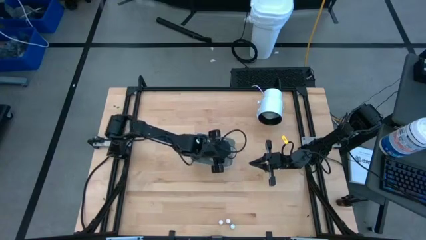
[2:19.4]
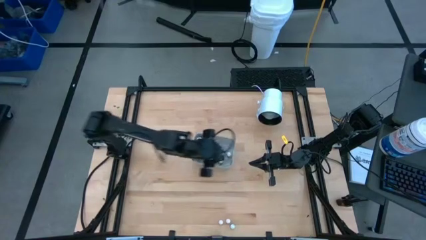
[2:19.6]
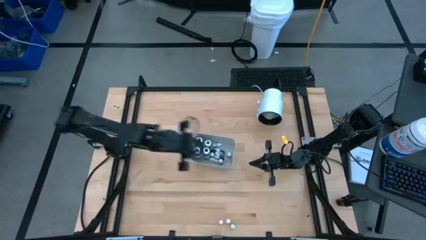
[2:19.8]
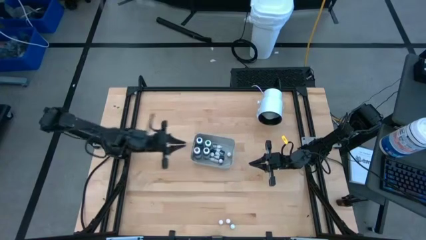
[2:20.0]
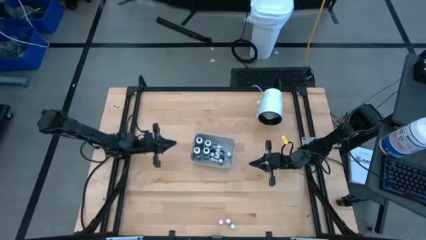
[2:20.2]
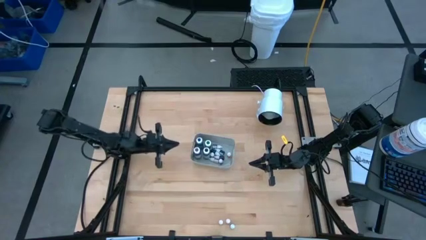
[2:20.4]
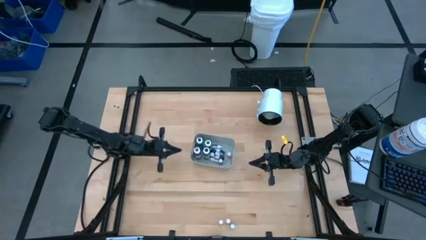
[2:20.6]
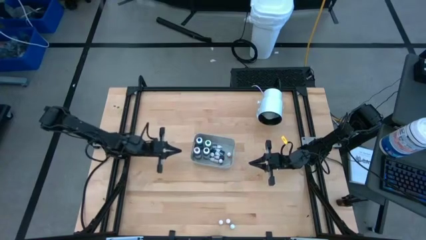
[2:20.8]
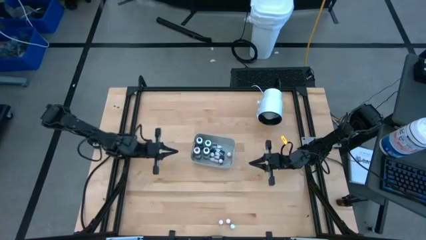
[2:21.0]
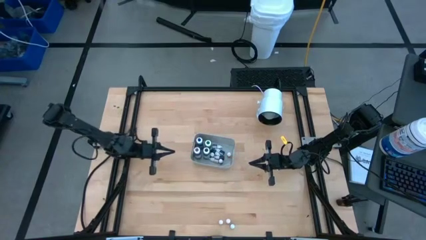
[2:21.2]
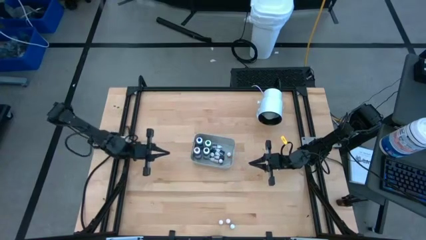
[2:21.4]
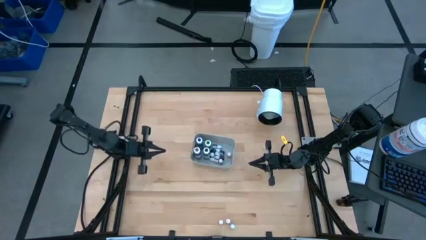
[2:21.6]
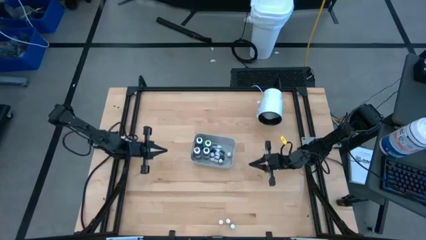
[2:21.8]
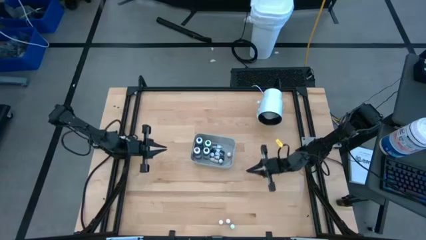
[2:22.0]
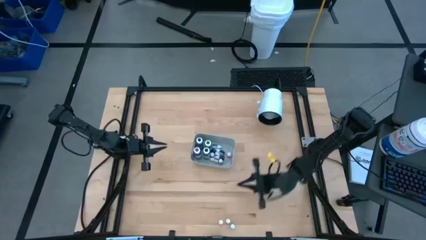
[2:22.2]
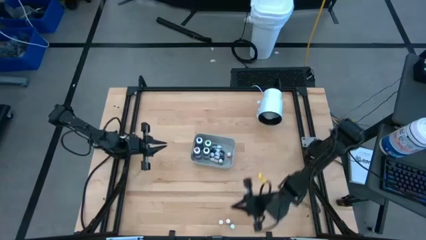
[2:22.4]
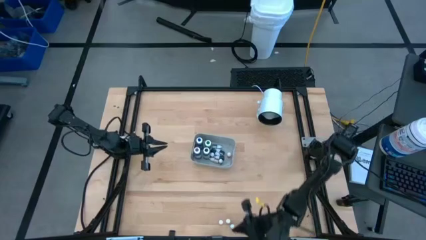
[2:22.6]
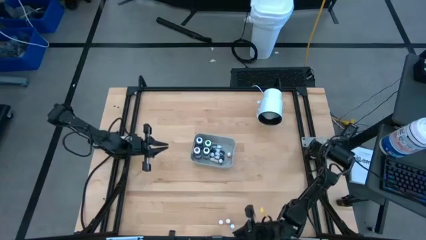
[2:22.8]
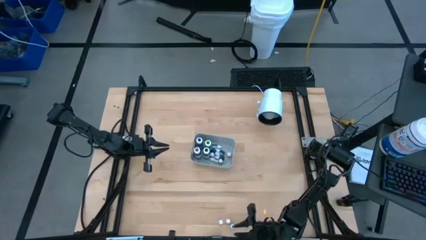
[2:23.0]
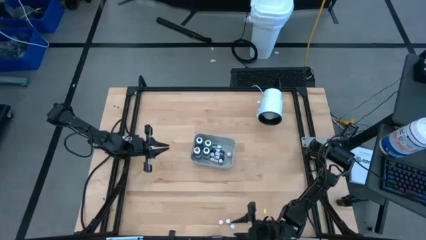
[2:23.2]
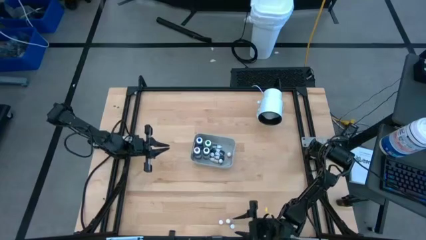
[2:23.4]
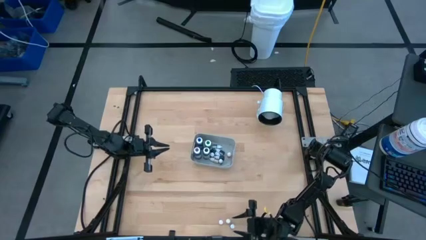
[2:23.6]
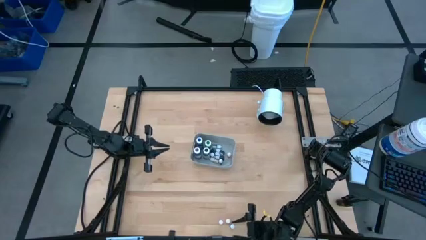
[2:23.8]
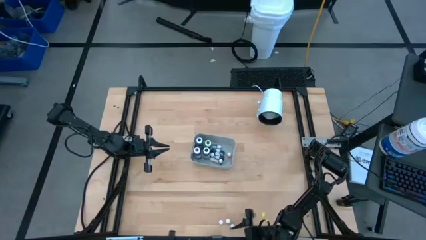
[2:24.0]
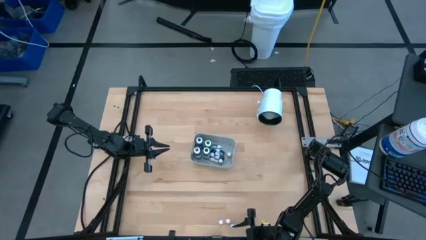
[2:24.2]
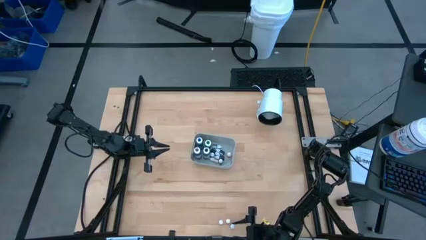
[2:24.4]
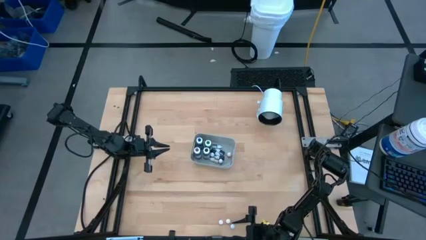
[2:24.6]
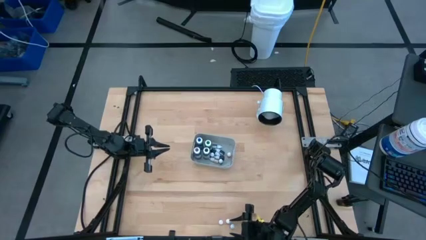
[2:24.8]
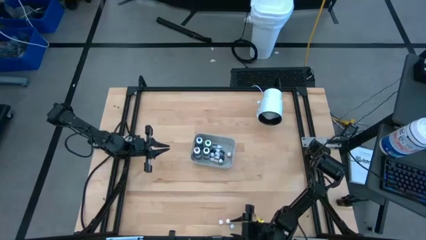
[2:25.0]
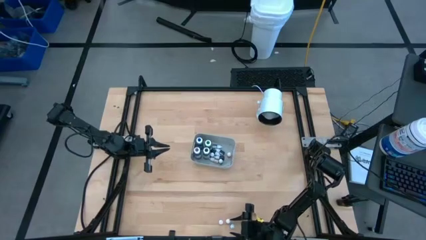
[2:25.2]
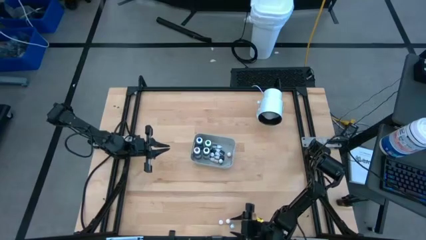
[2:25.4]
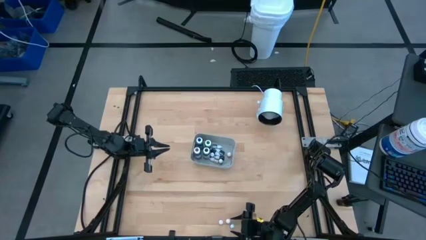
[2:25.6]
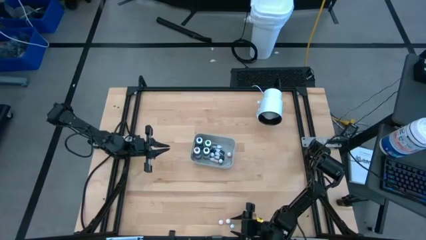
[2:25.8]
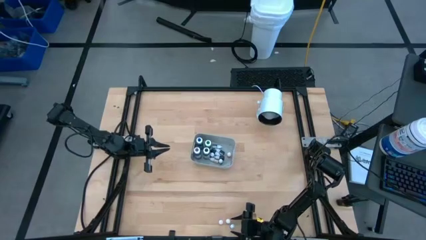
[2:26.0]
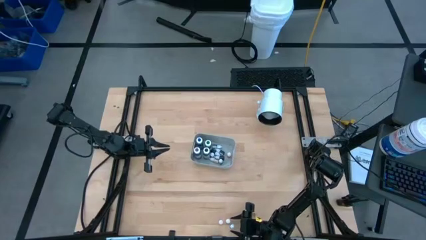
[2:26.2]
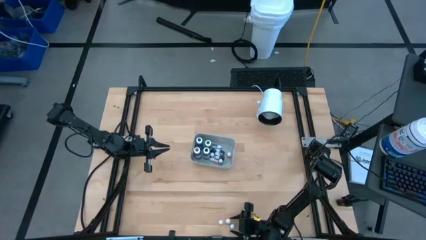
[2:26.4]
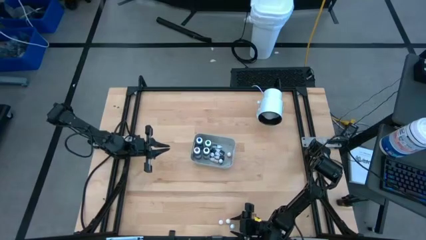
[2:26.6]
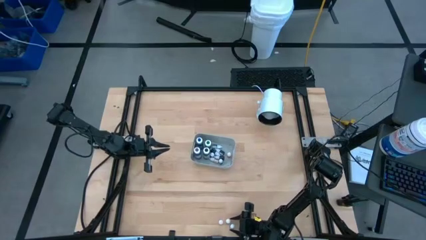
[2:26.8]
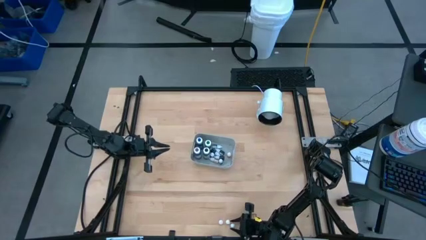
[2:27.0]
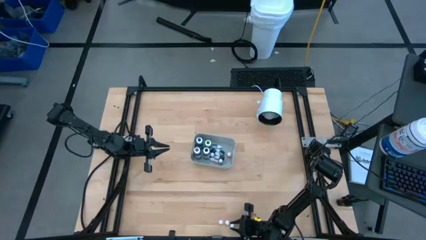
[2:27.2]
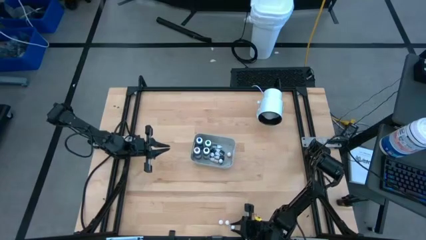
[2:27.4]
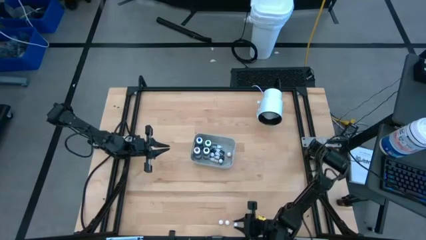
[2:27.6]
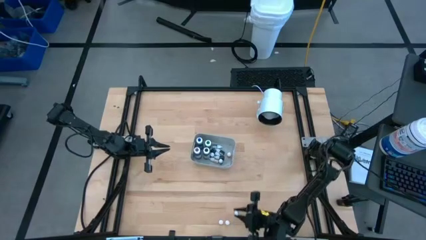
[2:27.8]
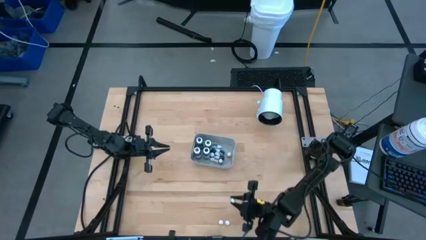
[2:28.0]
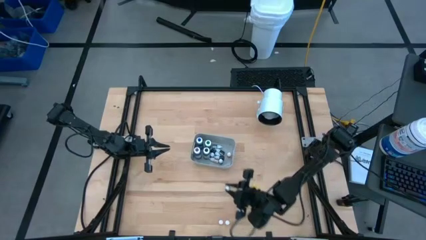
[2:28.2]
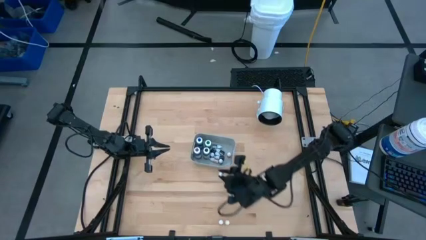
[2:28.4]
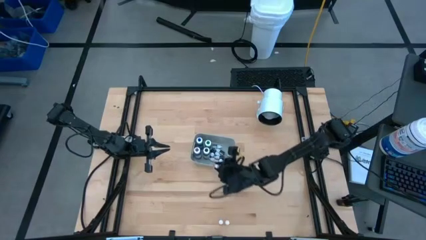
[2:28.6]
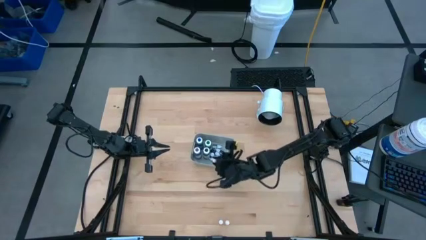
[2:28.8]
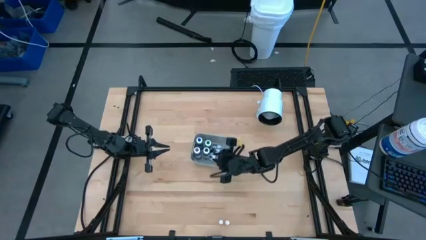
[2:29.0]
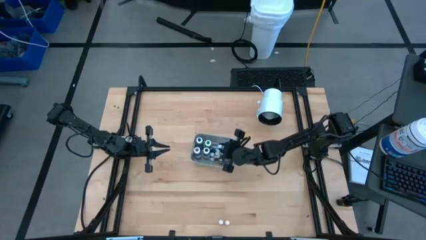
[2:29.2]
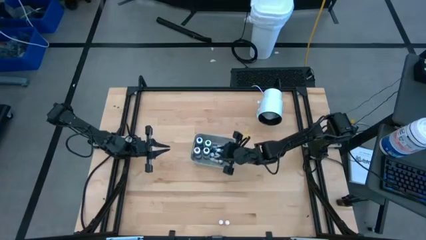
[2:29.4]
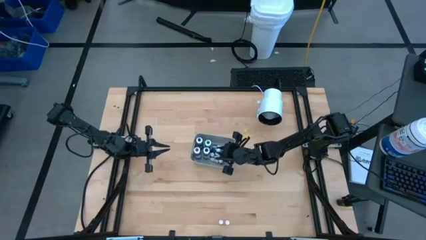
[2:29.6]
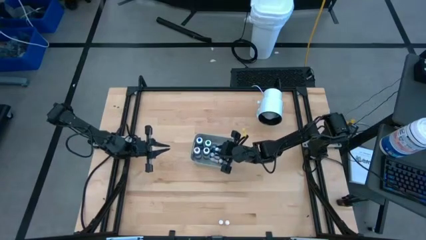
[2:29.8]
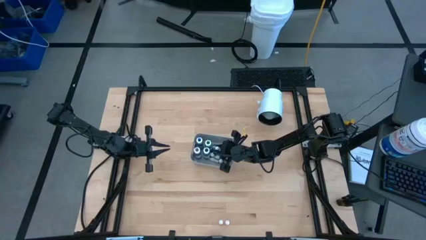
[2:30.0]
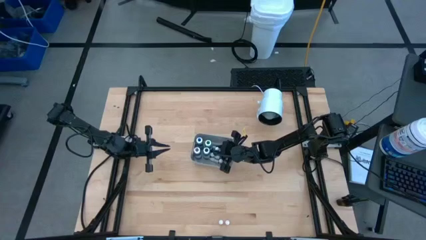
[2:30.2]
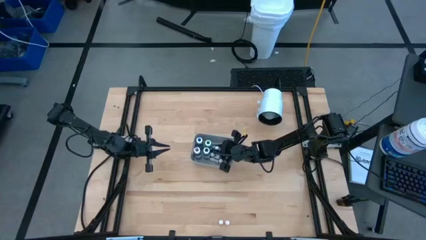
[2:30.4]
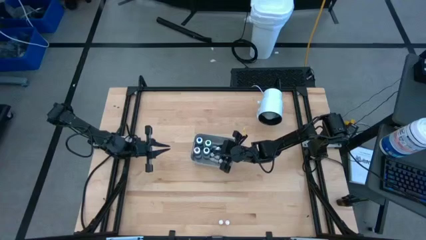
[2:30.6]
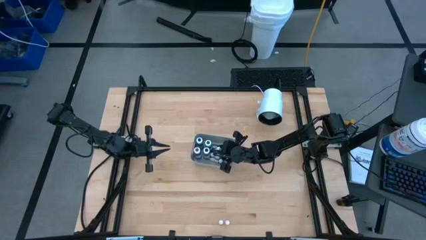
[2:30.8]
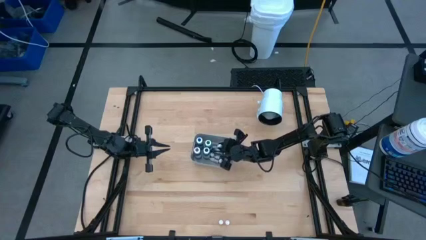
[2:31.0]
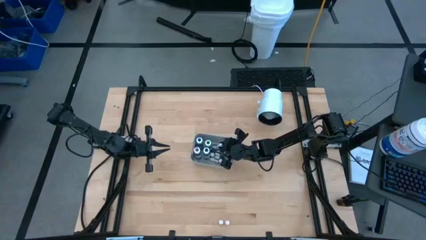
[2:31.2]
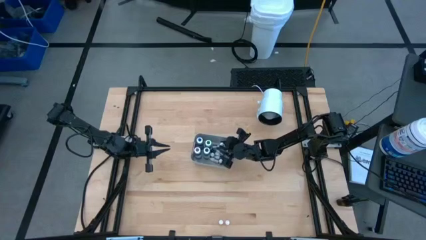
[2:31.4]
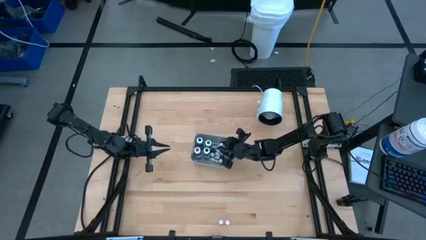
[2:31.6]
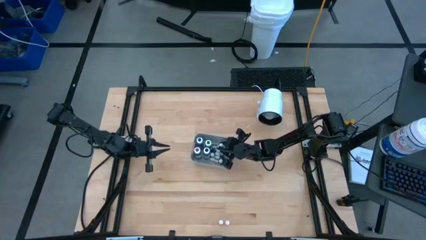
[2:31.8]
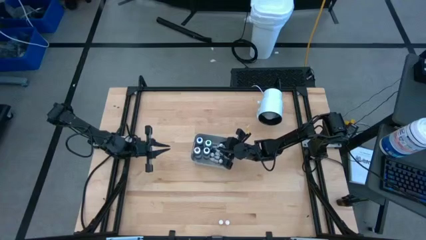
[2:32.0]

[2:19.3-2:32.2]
Task: Pick & Place food coloring
Put the blue food coloring bottle into the gray bin
